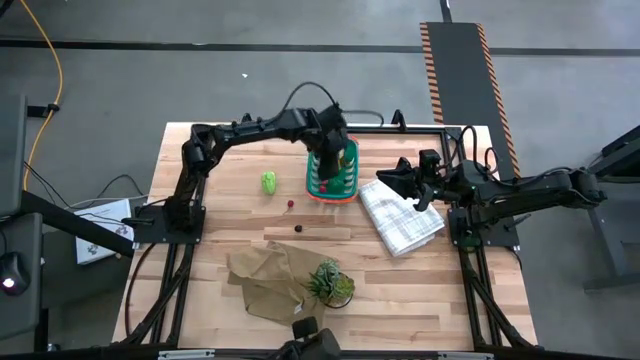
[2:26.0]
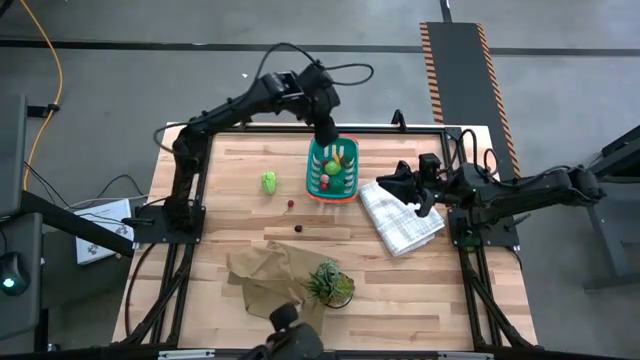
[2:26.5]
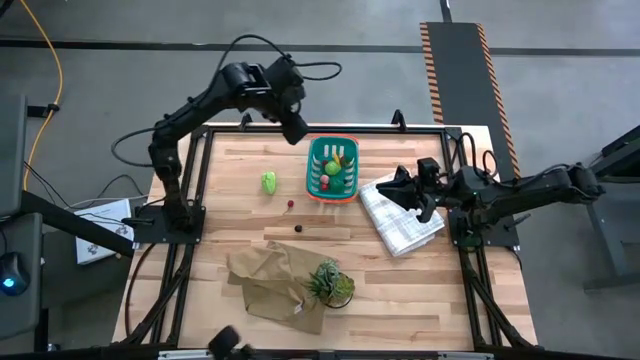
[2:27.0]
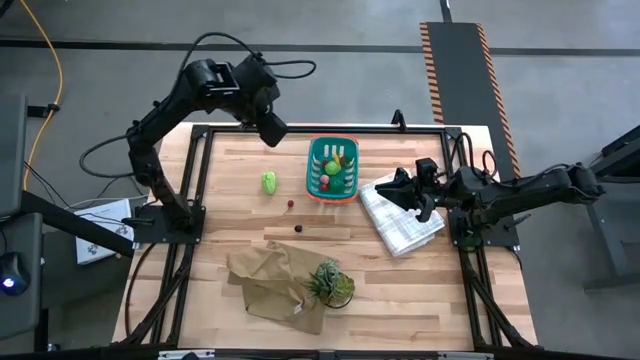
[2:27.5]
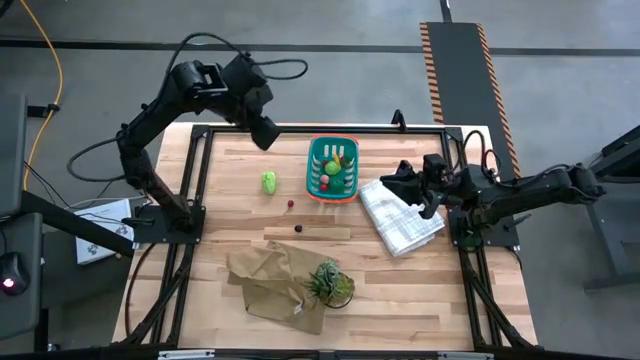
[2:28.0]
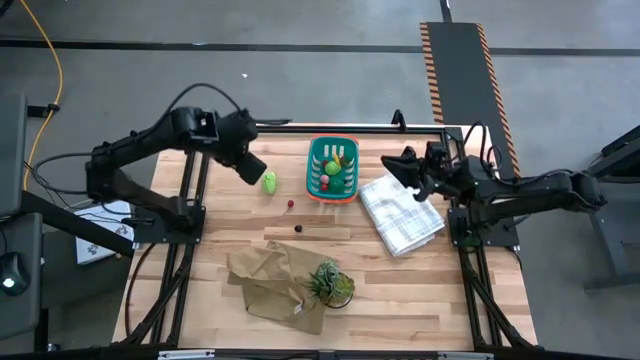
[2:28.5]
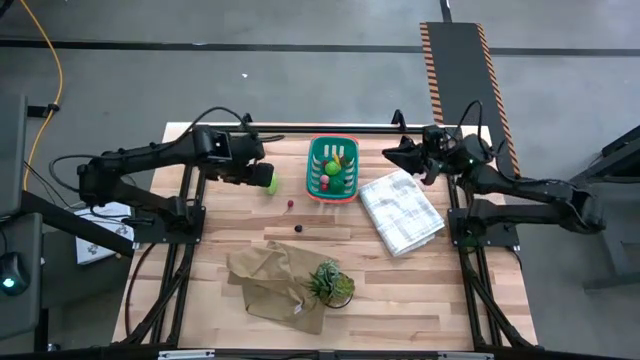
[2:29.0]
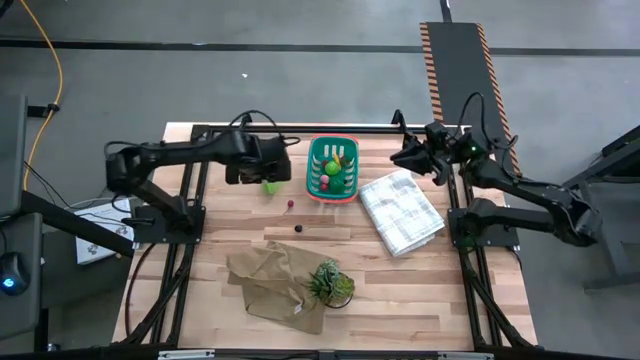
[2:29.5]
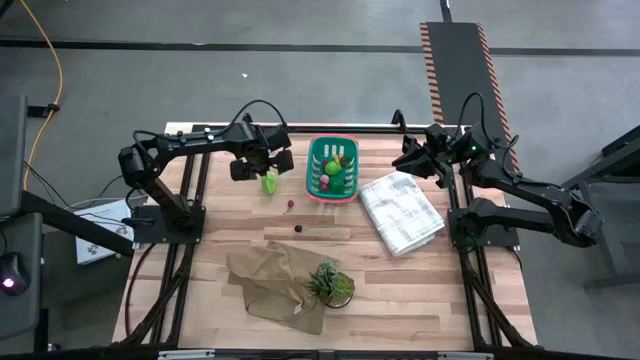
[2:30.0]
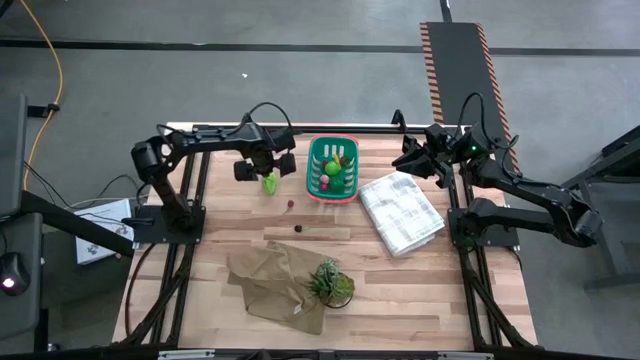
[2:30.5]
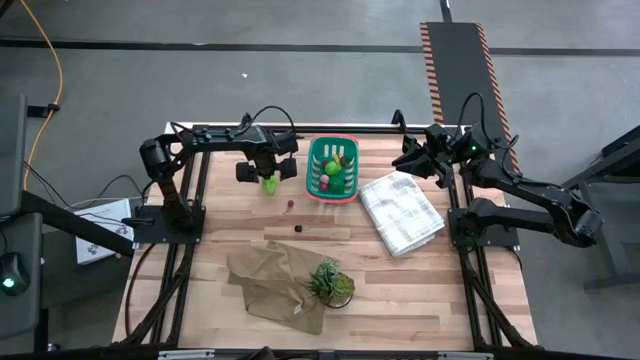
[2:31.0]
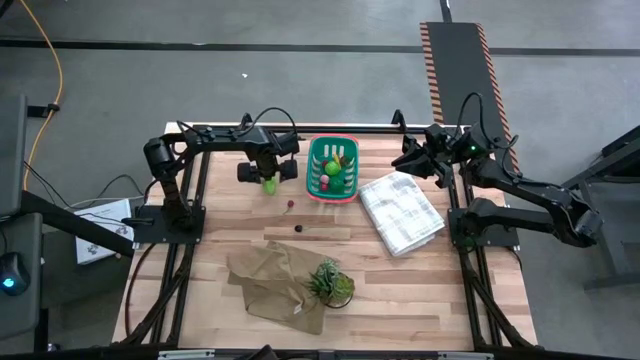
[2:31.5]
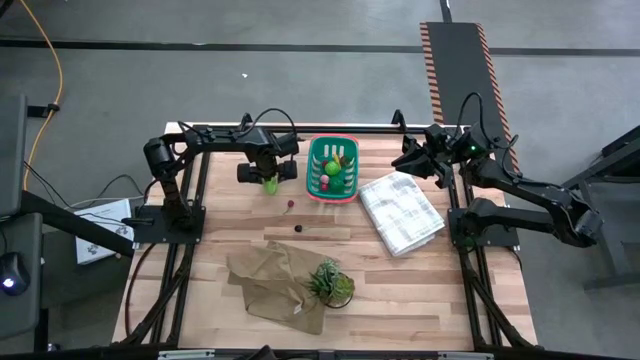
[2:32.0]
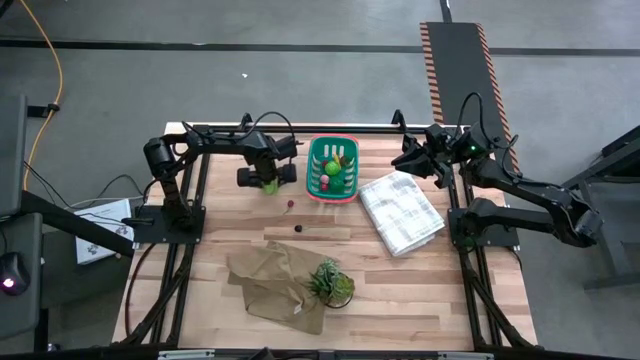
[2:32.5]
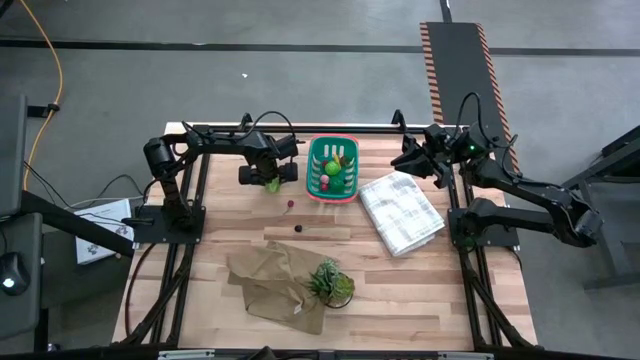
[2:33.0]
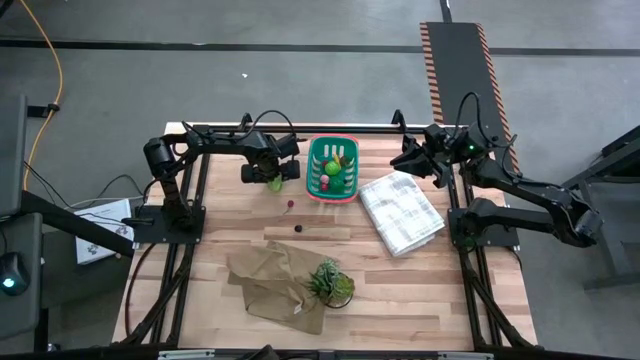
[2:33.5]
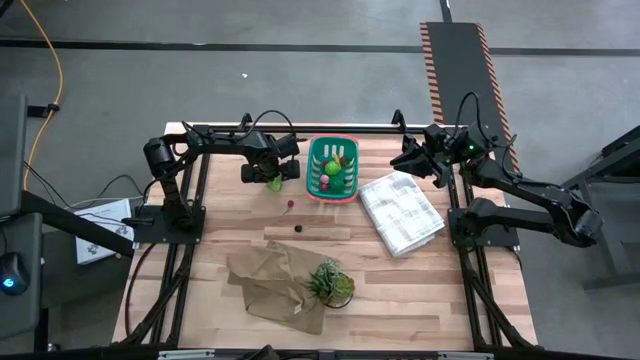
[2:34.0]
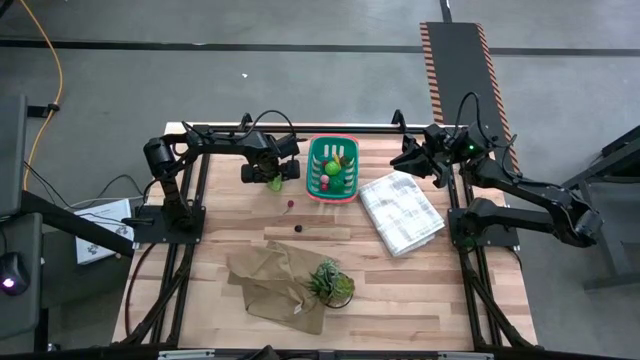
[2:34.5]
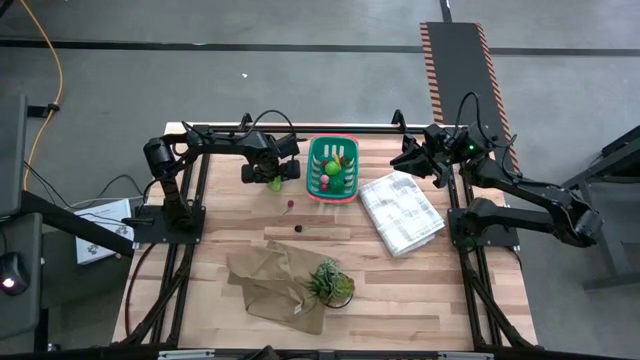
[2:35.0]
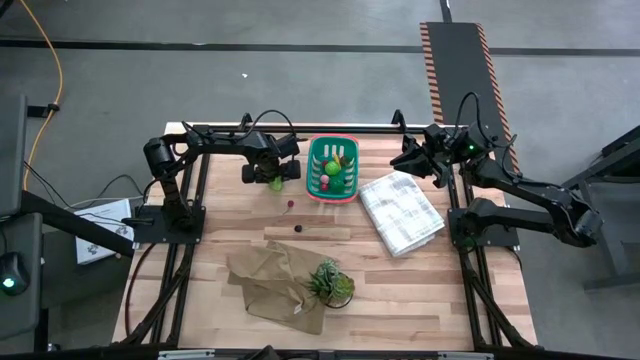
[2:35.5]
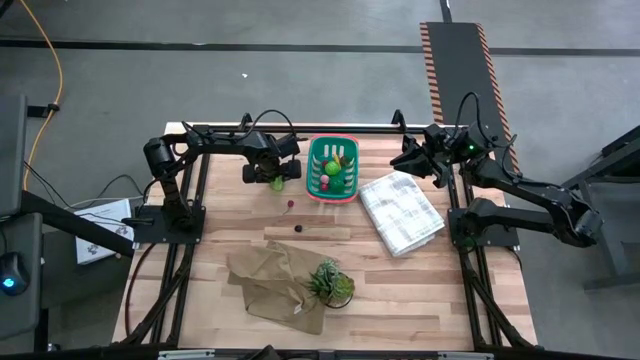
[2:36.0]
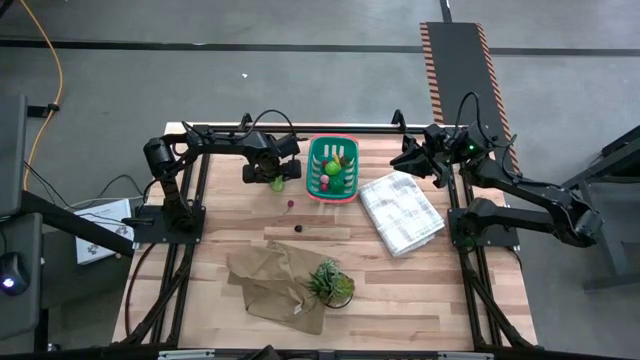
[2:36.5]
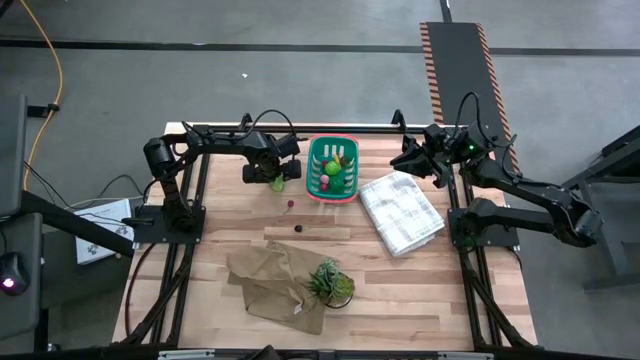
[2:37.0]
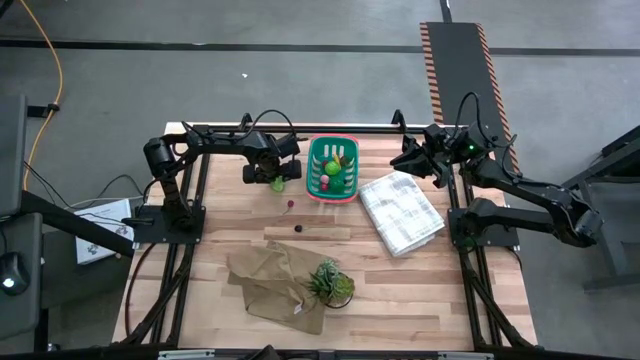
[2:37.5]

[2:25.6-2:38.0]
Task: Pick and placing Produce into tupperware
Put the green starfruit into the green basket

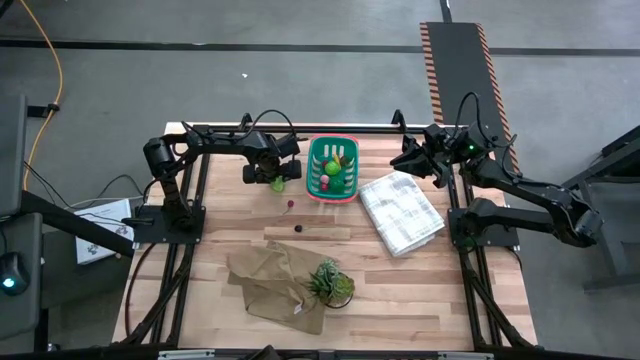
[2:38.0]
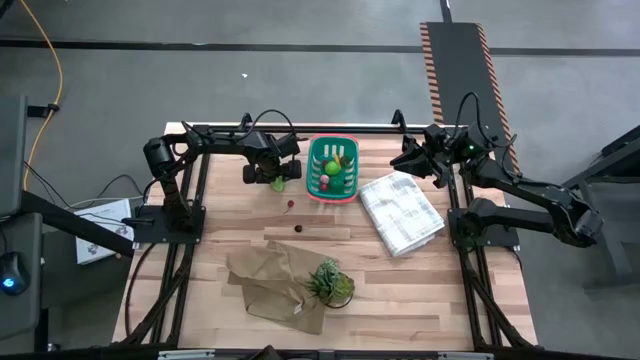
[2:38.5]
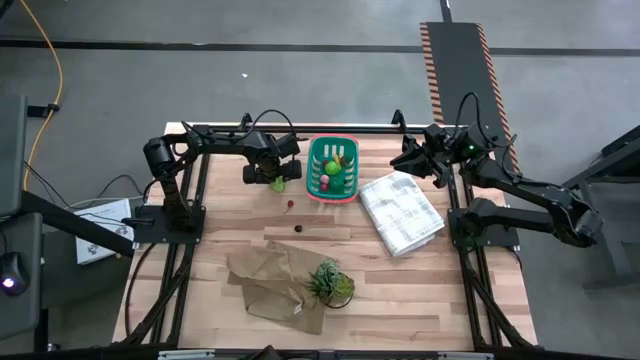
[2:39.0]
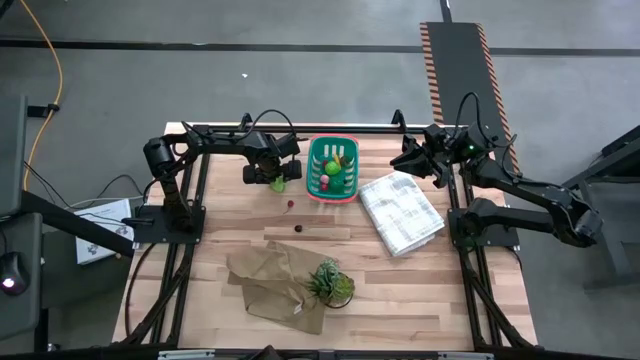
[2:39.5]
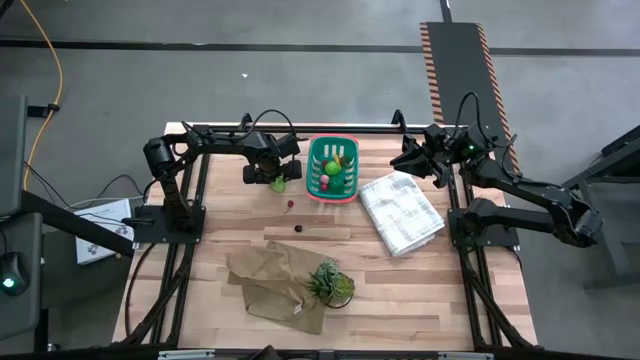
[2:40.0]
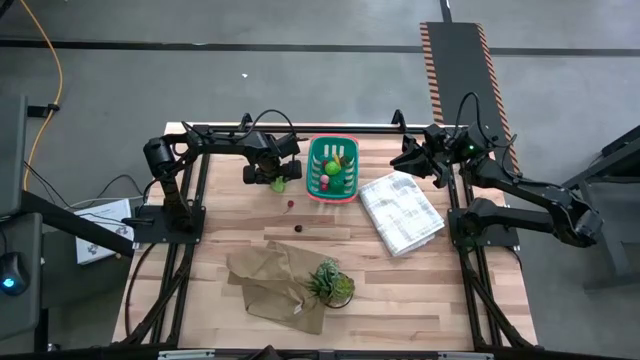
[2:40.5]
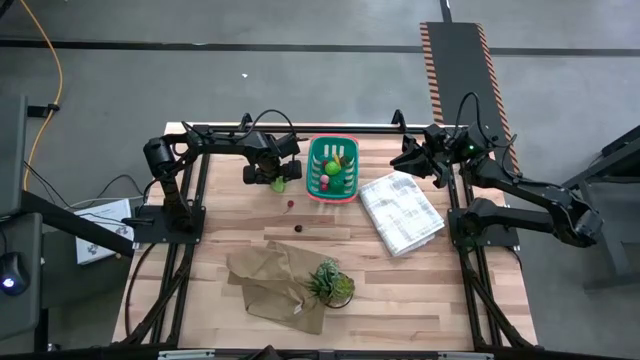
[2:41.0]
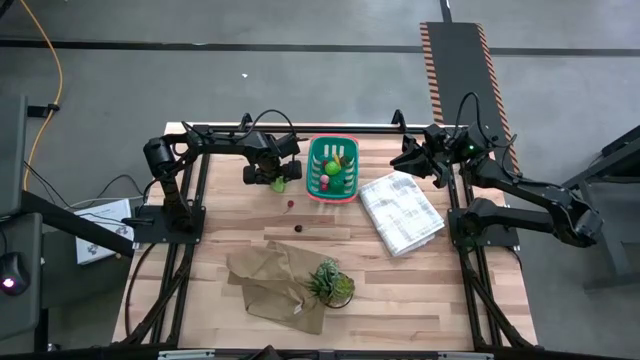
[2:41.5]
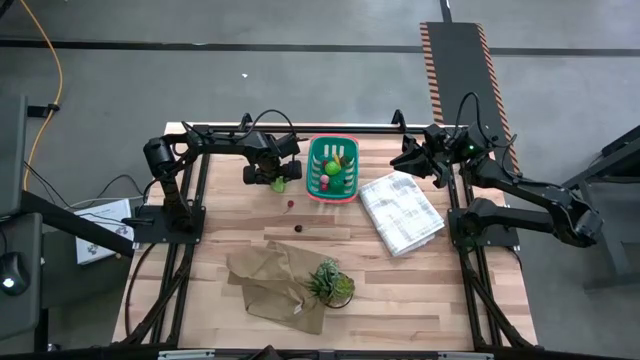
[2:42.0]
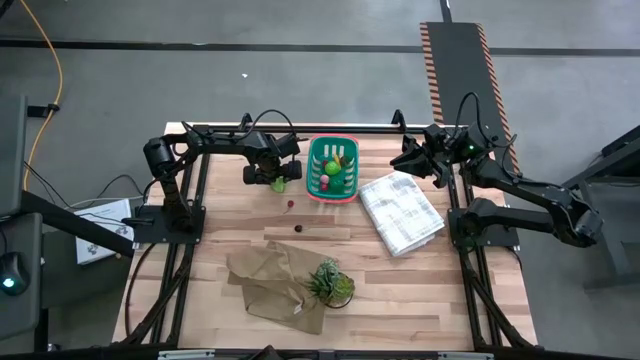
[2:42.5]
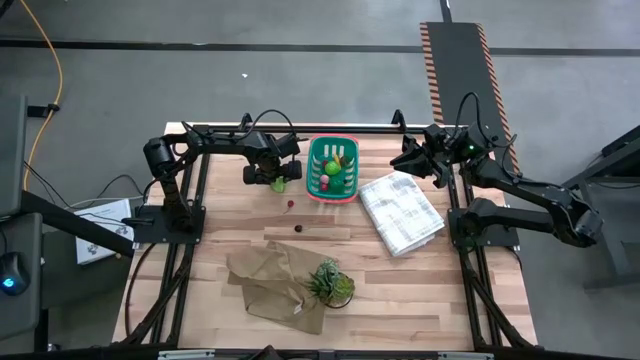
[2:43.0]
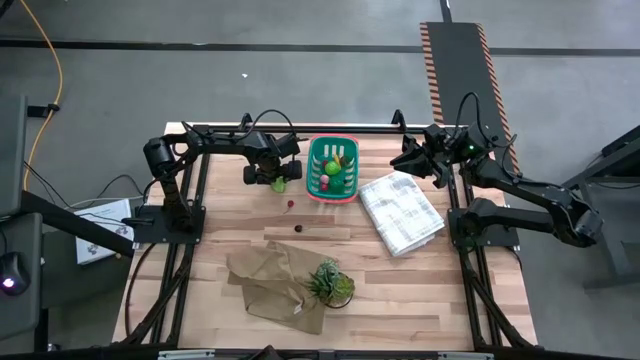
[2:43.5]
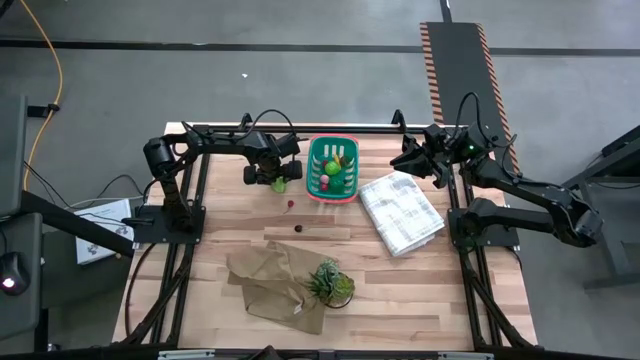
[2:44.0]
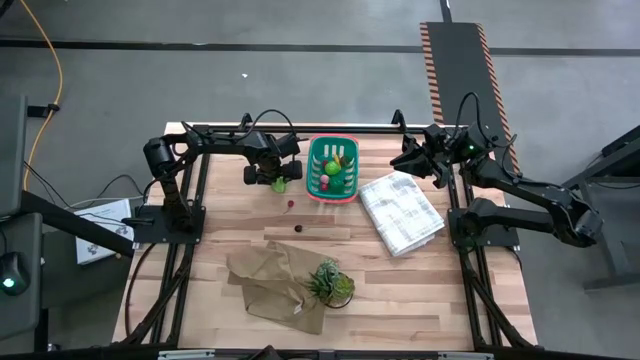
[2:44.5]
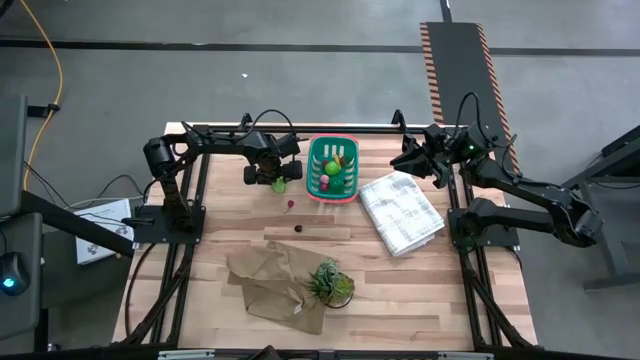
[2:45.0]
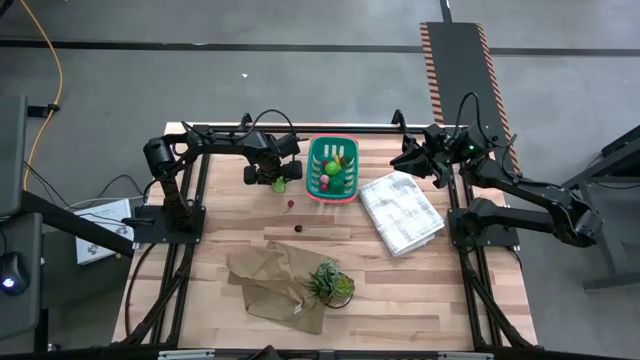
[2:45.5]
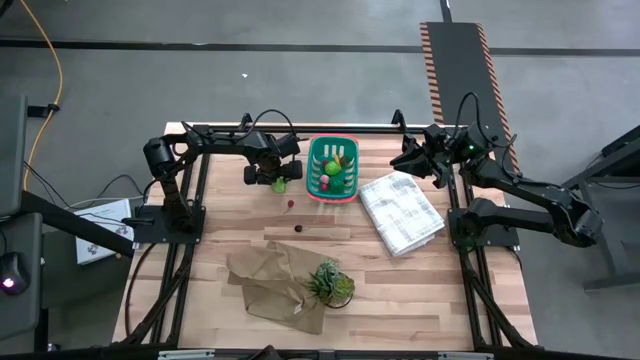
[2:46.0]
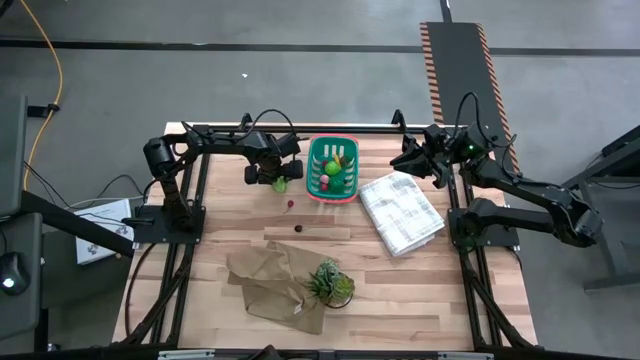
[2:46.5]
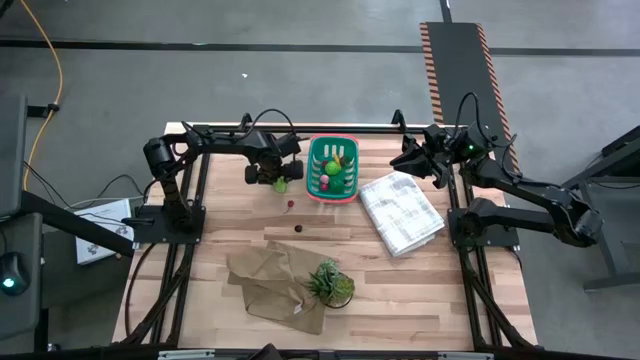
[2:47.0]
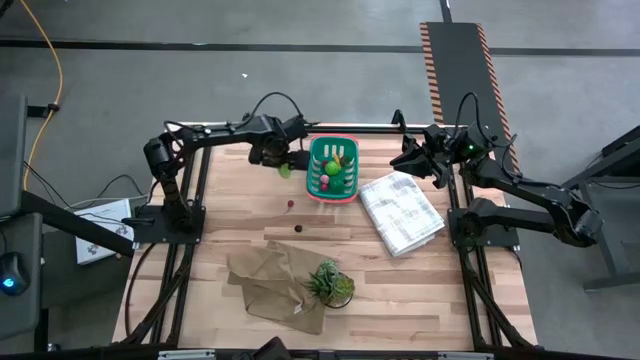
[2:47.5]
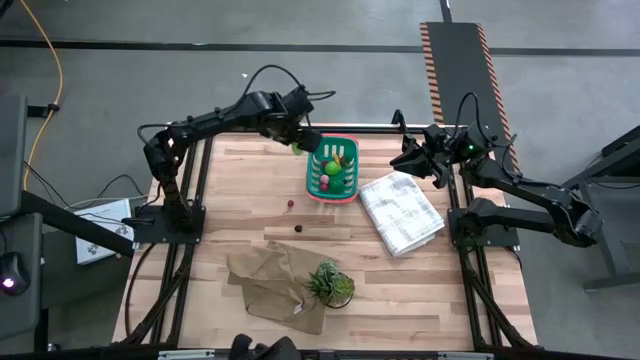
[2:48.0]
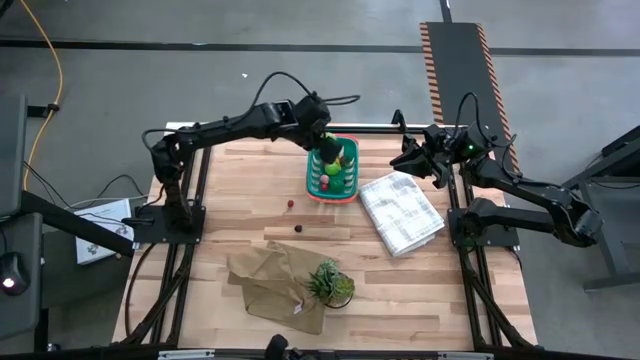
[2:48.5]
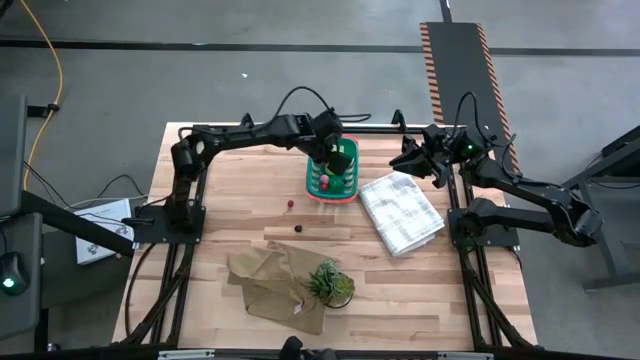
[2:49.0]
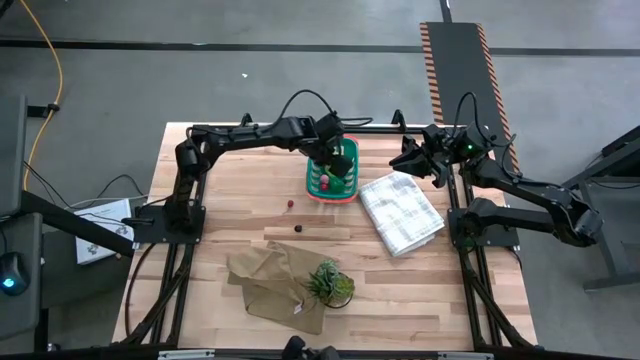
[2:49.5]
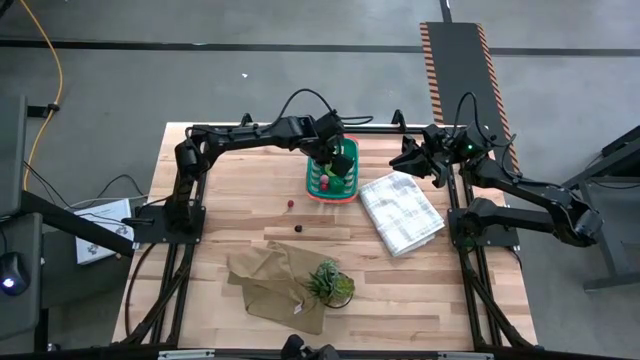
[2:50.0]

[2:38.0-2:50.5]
Put the green starfruit into the green basket
